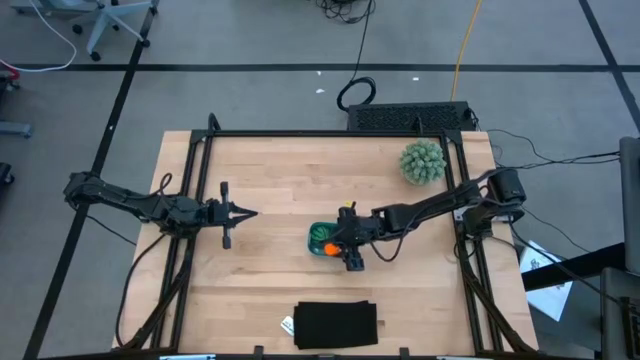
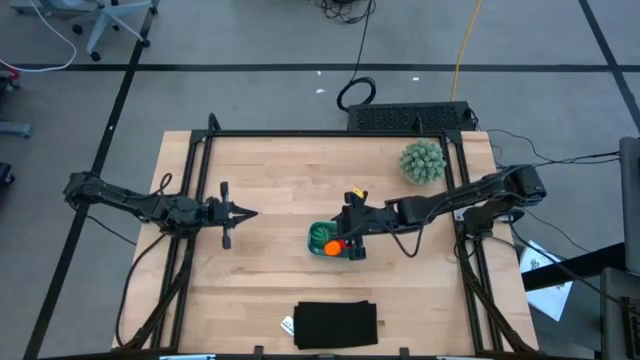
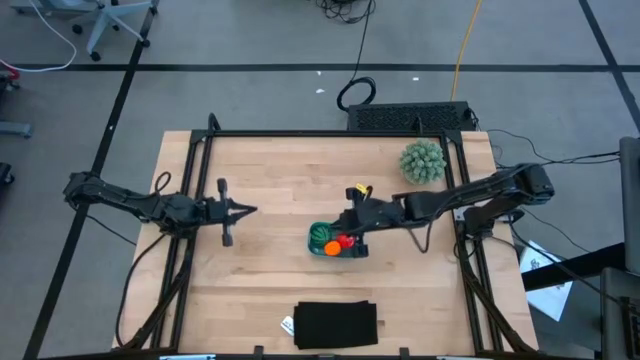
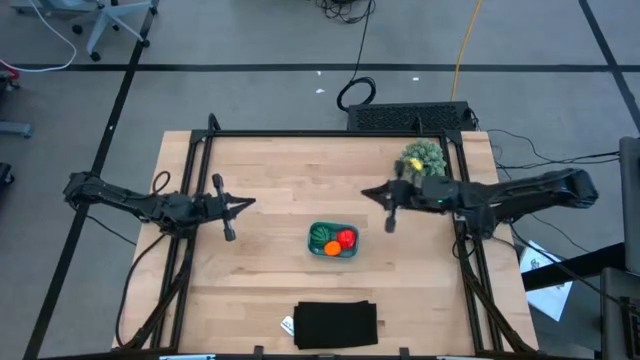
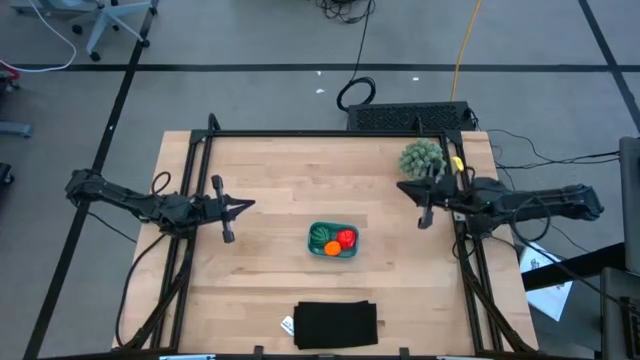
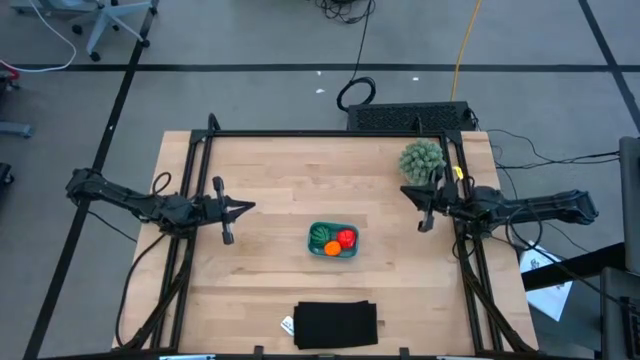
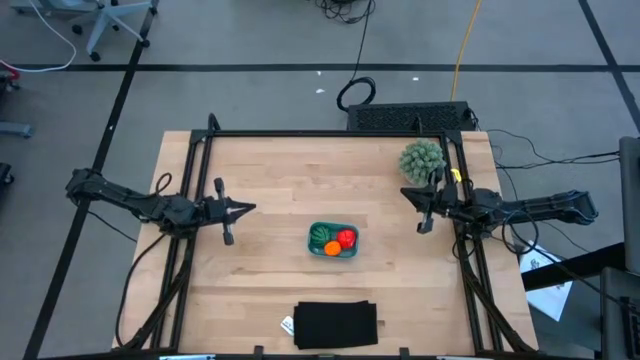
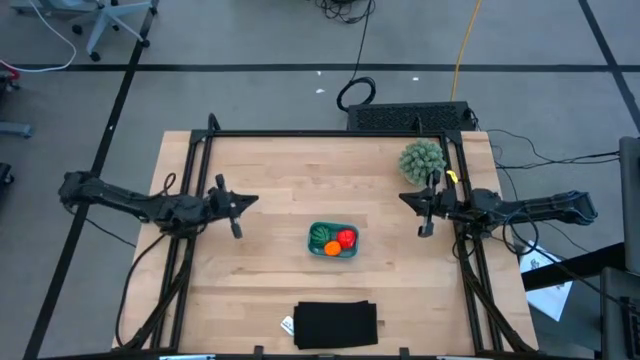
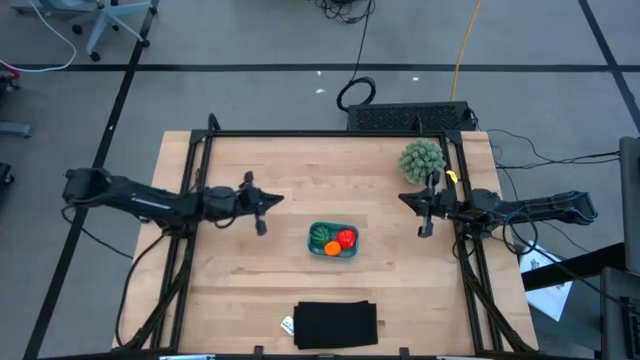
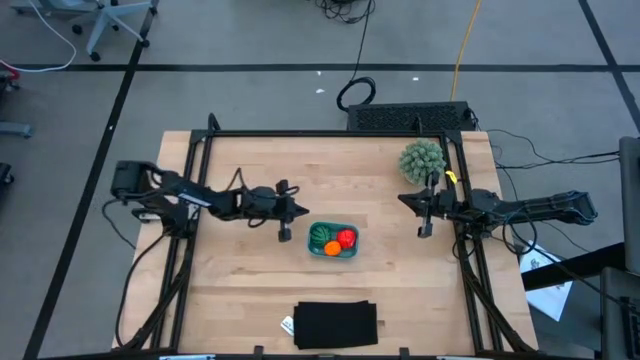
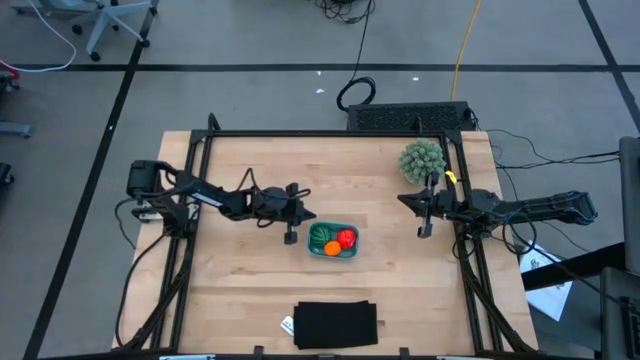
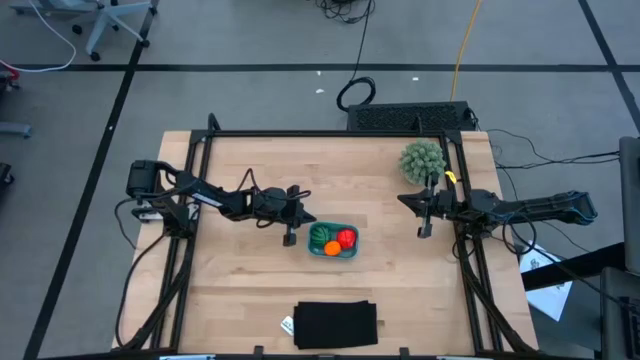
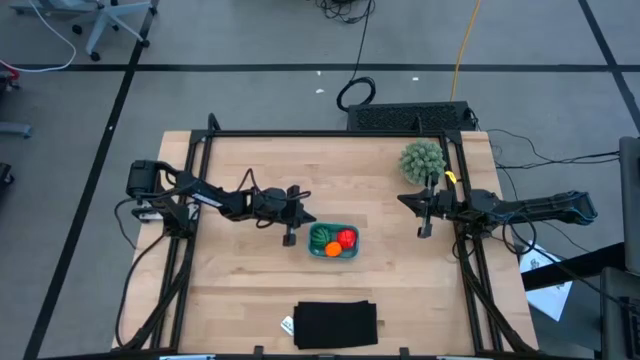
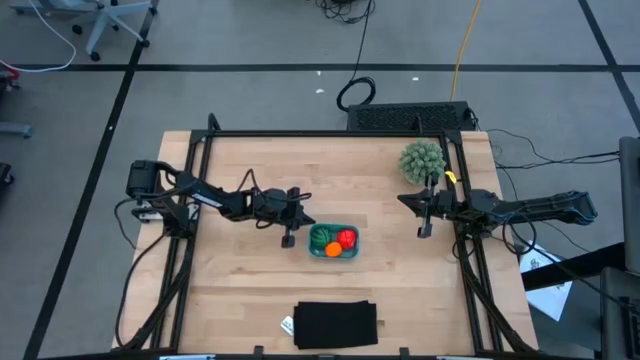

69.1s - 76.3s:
Task: Pick and placing Produce into tupperware
Adjust the blue bin on the table

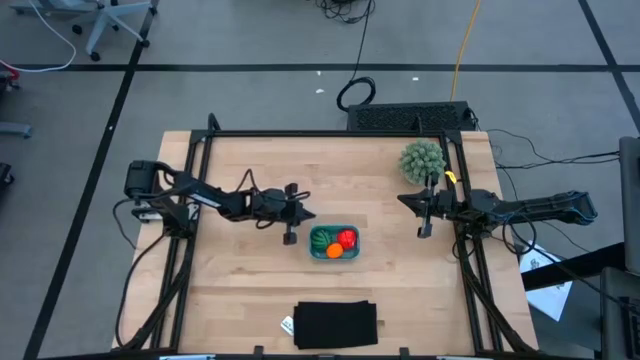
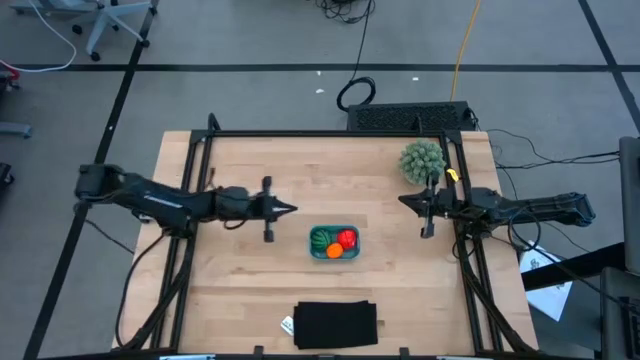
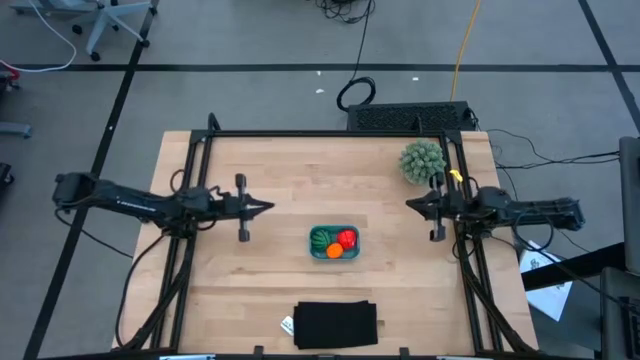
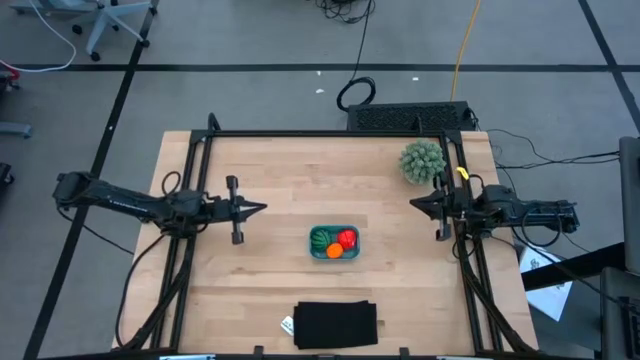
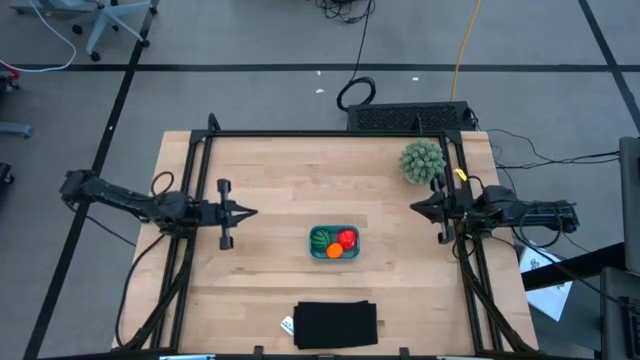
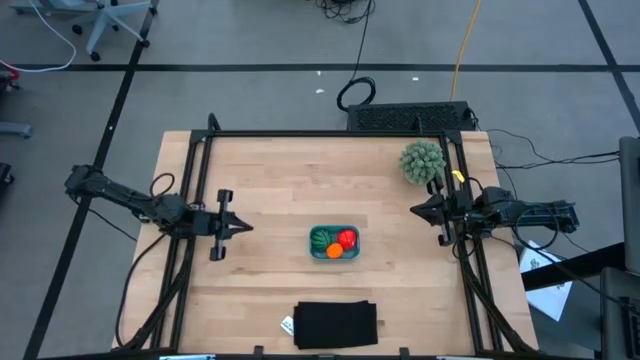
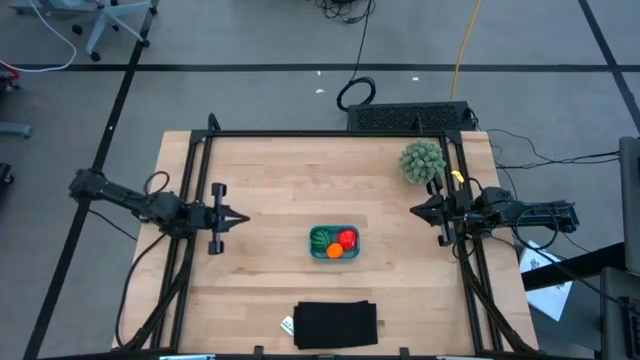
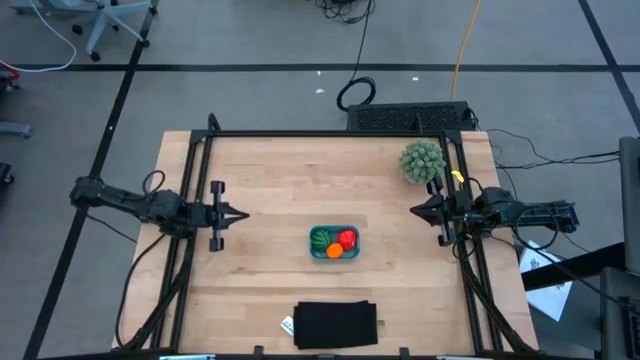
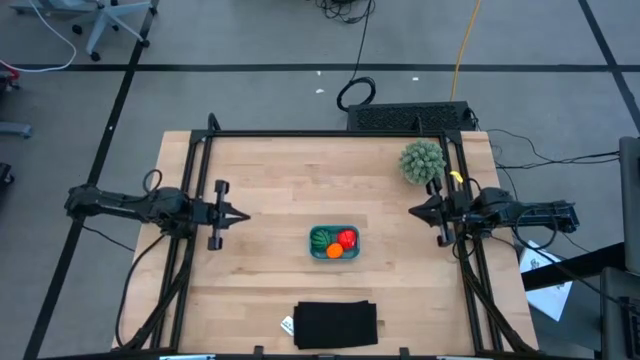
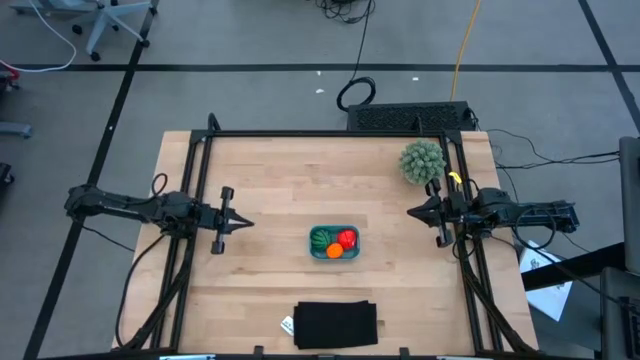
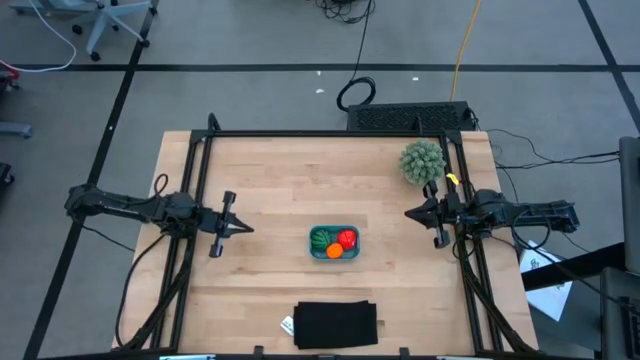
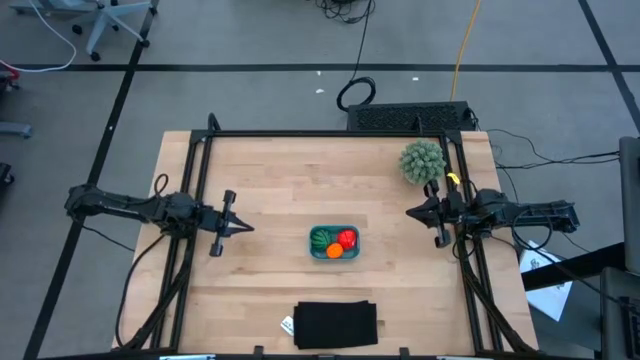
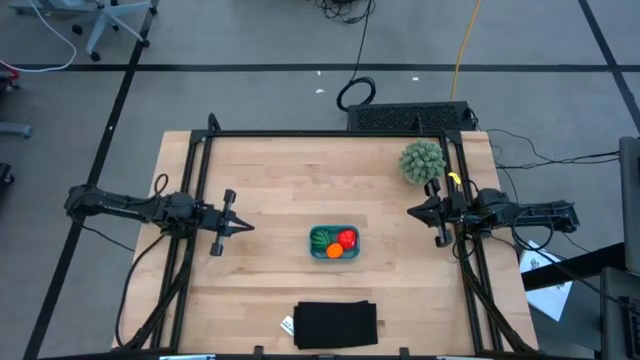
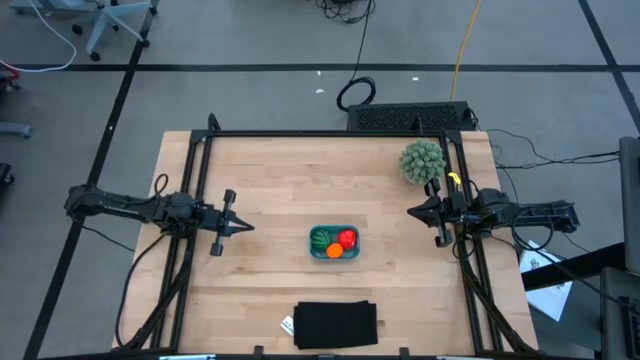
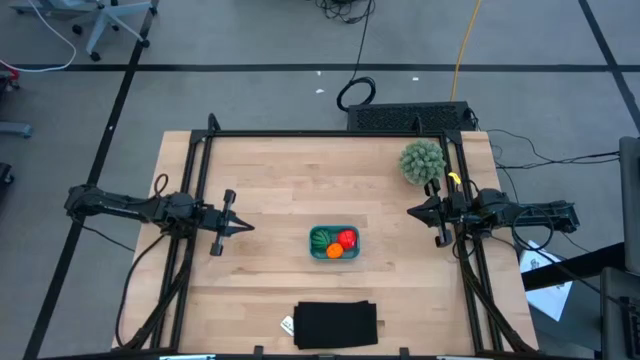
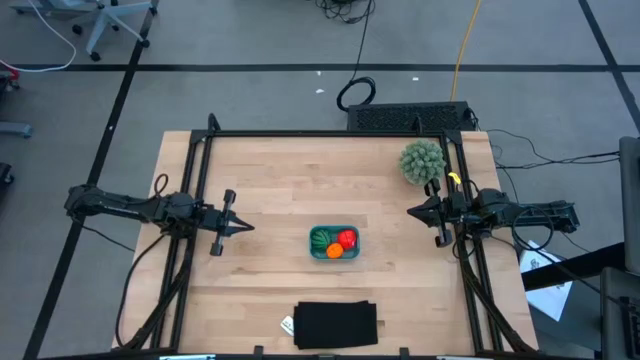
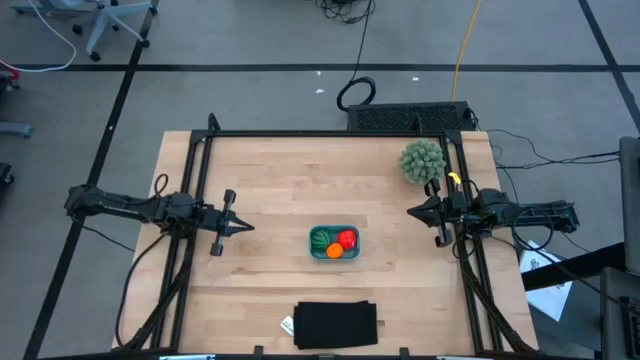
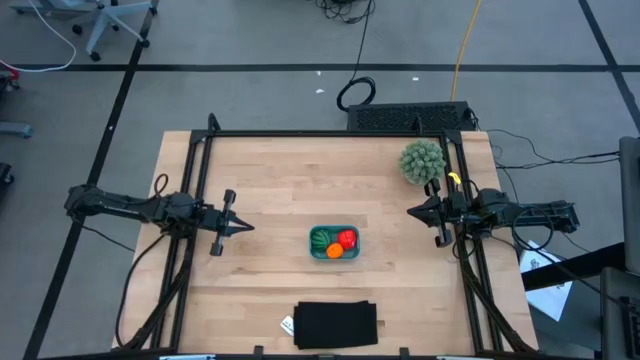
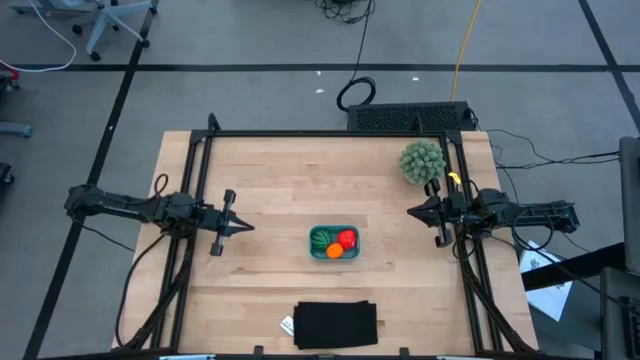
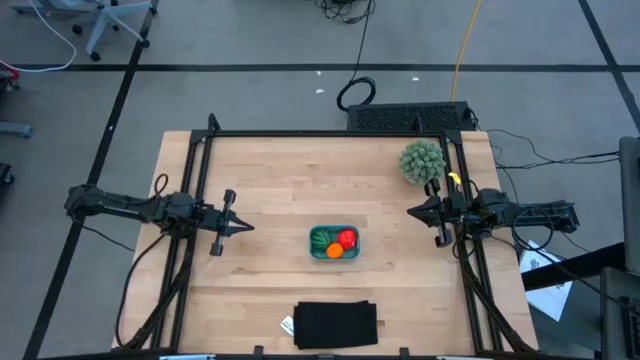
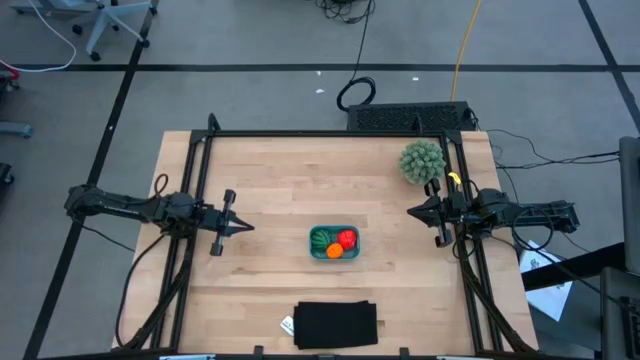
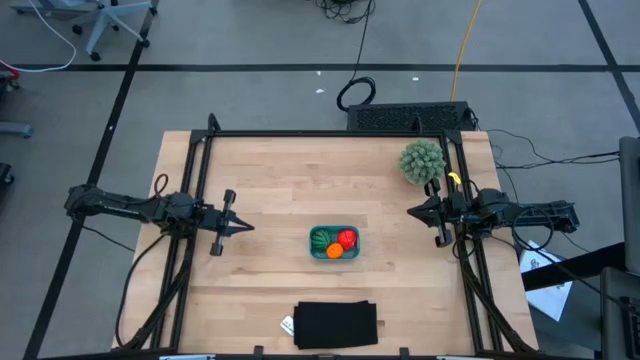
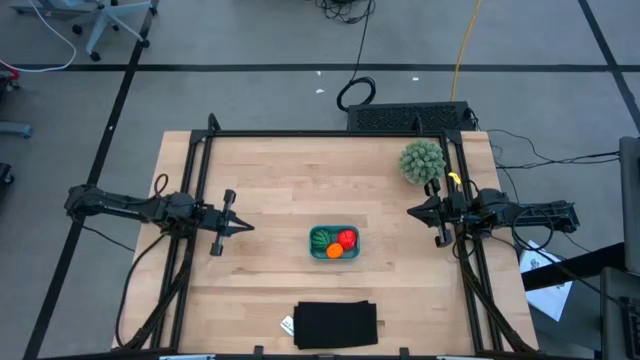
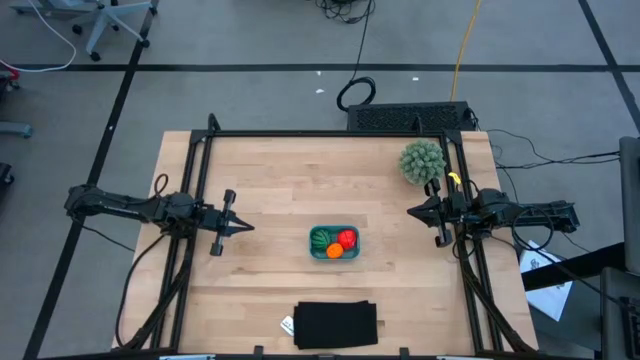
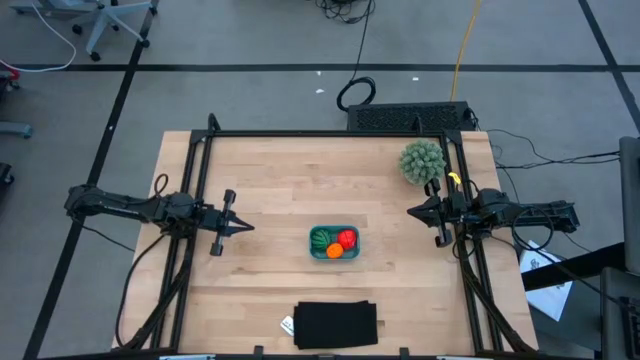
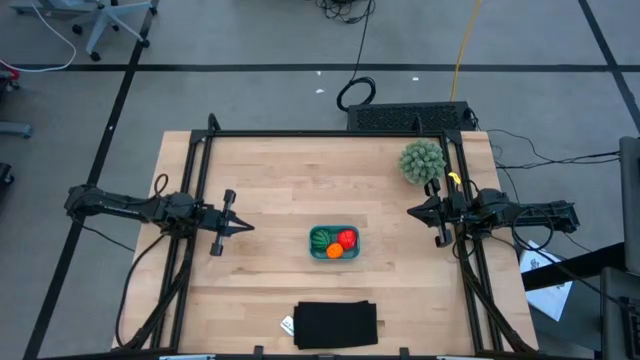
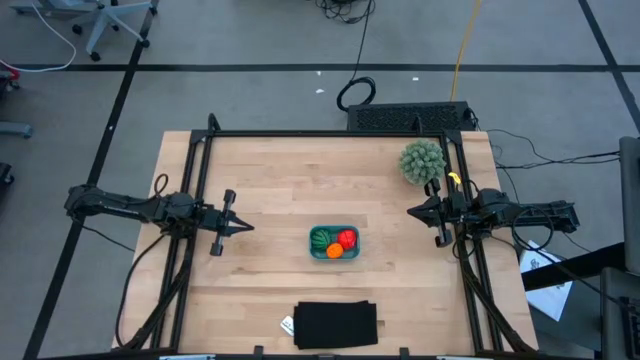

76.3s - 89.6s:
Return to Home Position

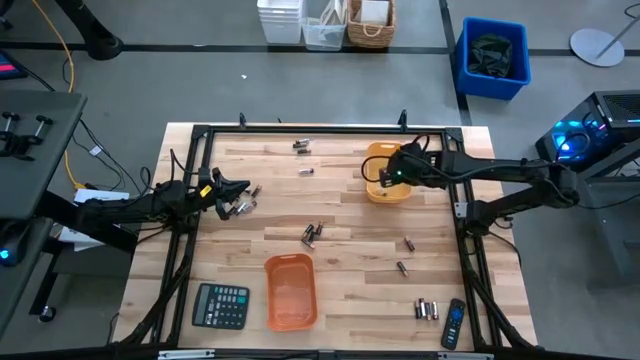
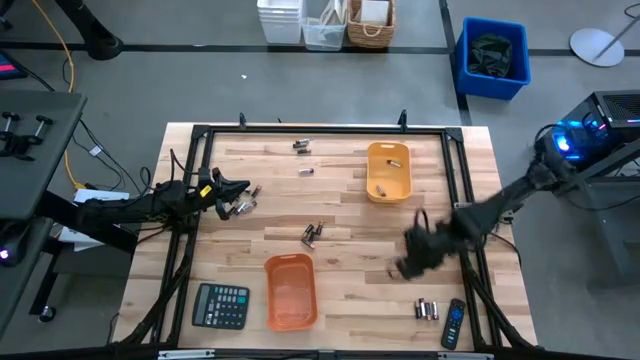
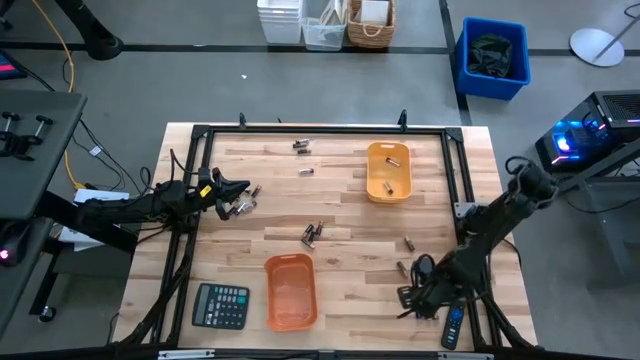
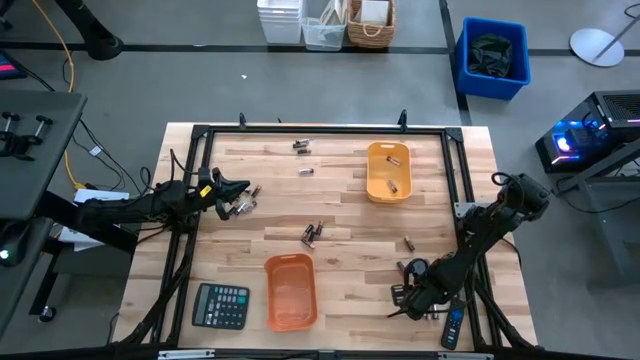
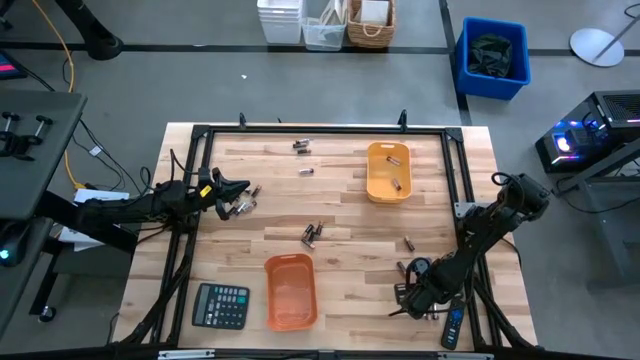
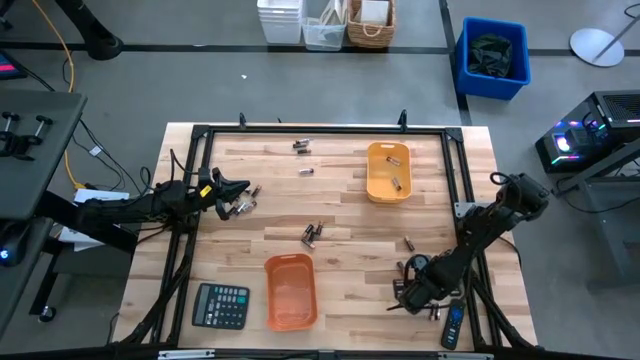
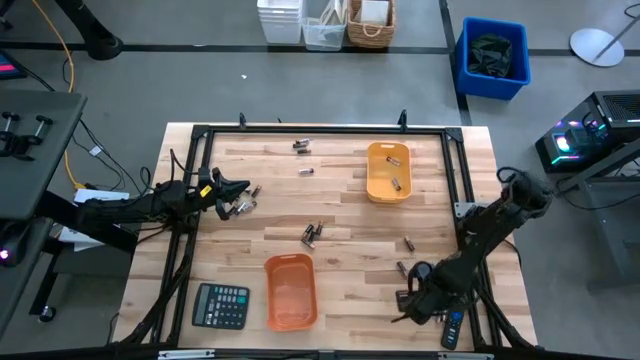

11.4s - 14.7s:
Task: Sort batteries
Put the silver battery into the yellow bin
